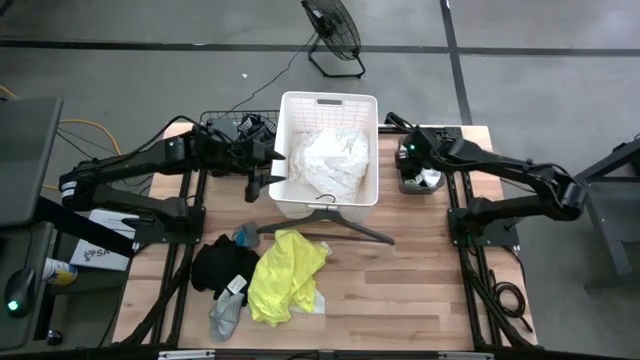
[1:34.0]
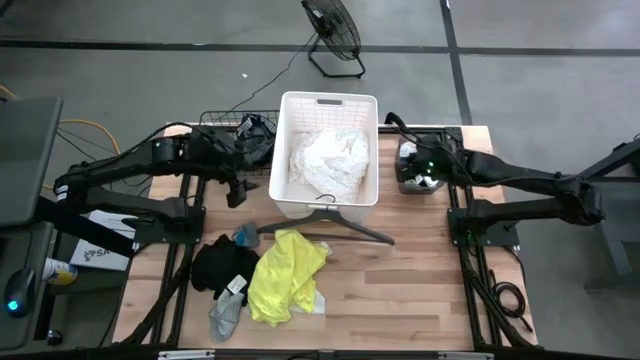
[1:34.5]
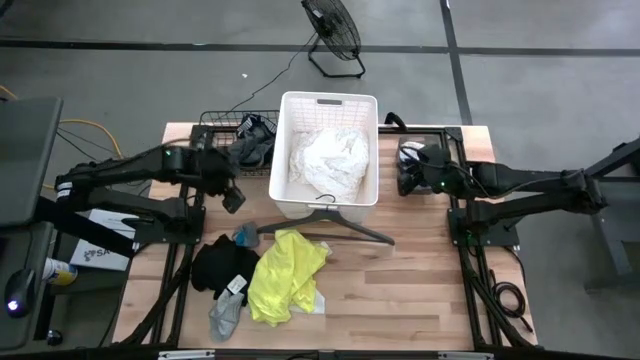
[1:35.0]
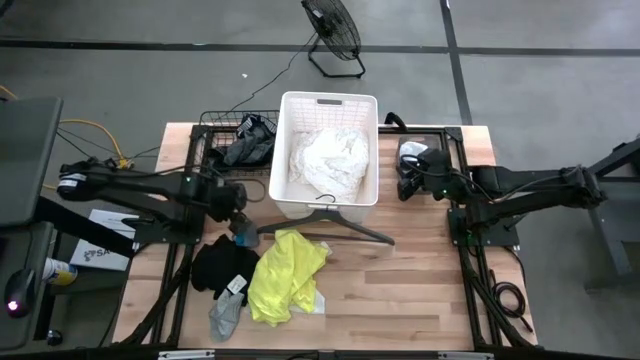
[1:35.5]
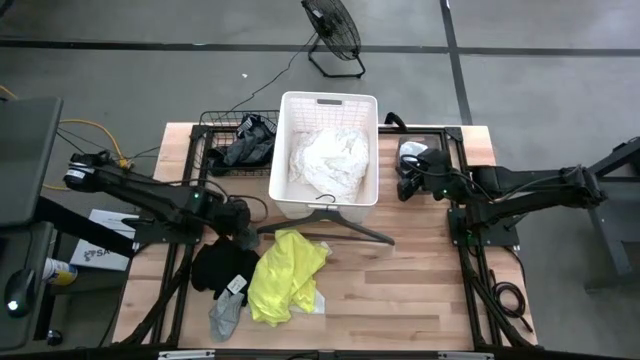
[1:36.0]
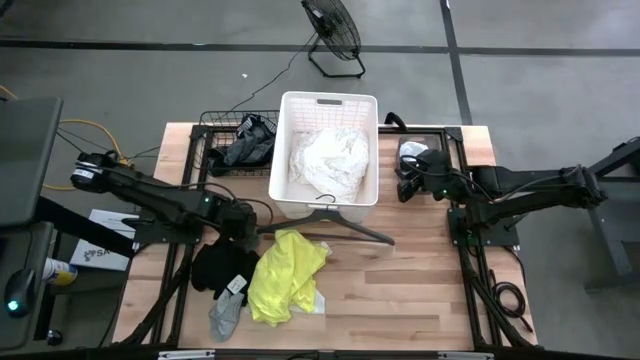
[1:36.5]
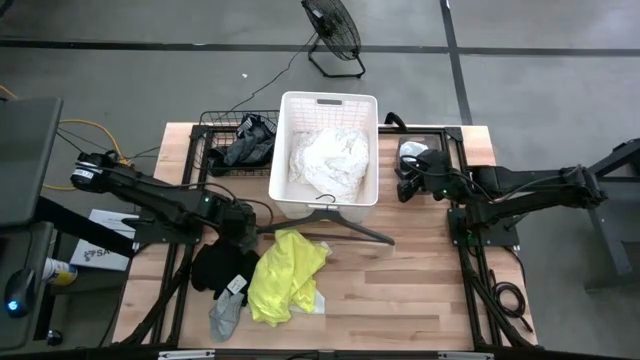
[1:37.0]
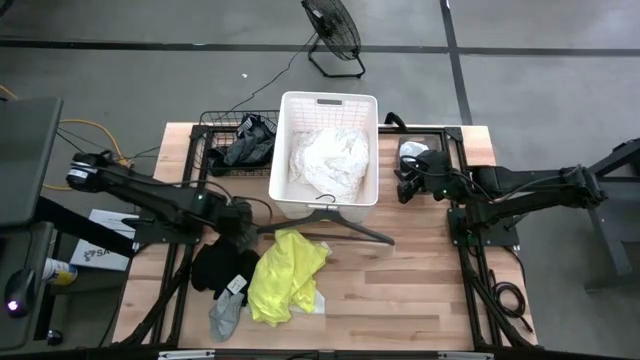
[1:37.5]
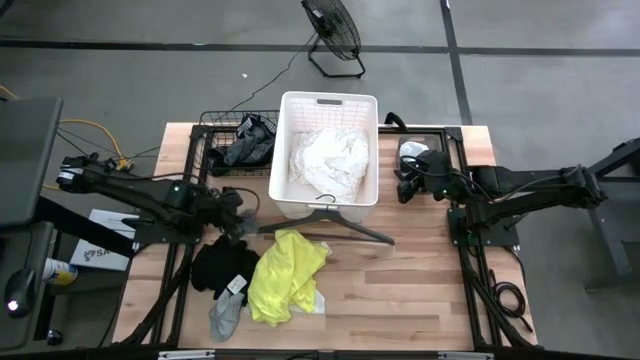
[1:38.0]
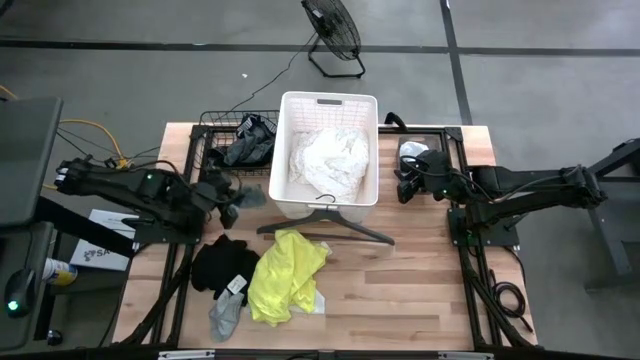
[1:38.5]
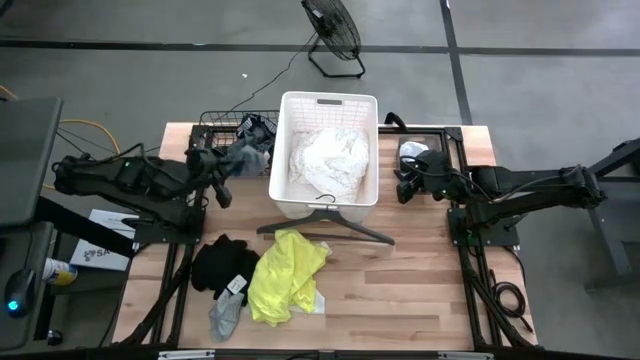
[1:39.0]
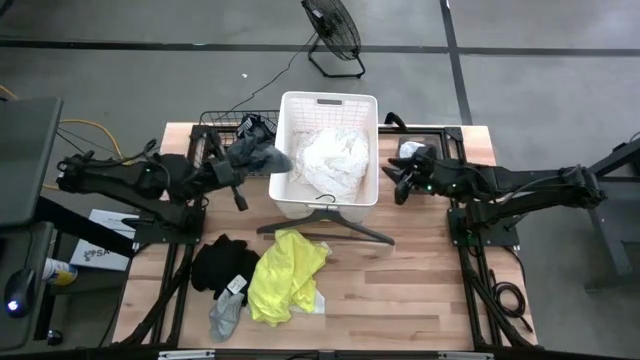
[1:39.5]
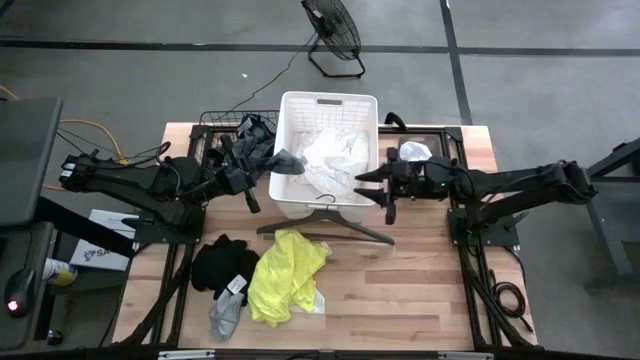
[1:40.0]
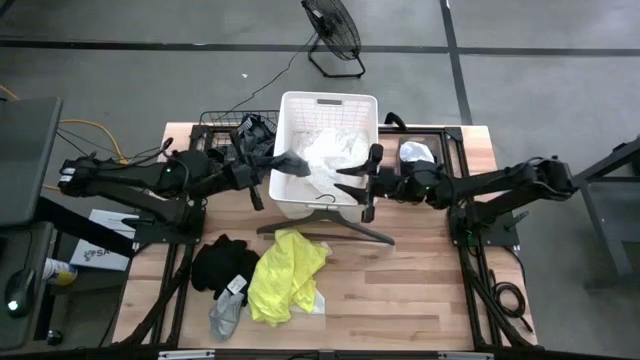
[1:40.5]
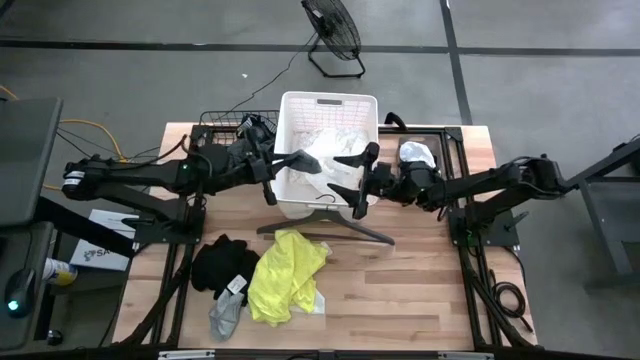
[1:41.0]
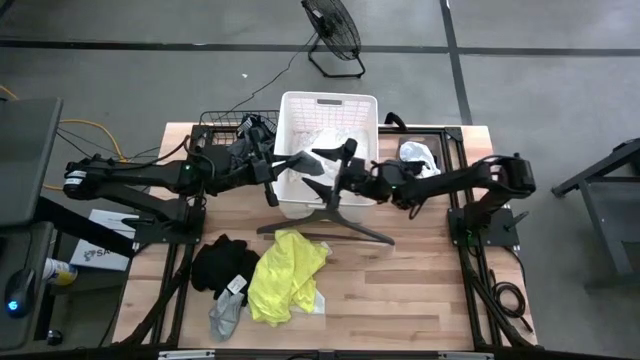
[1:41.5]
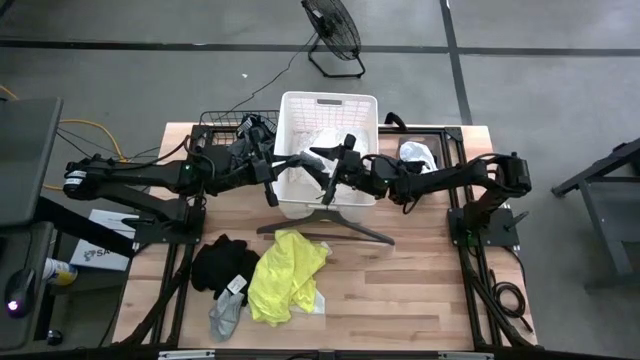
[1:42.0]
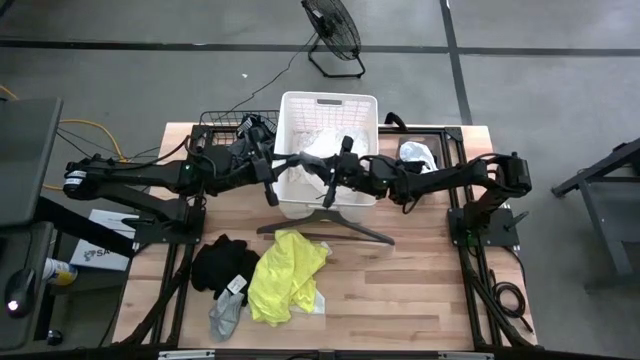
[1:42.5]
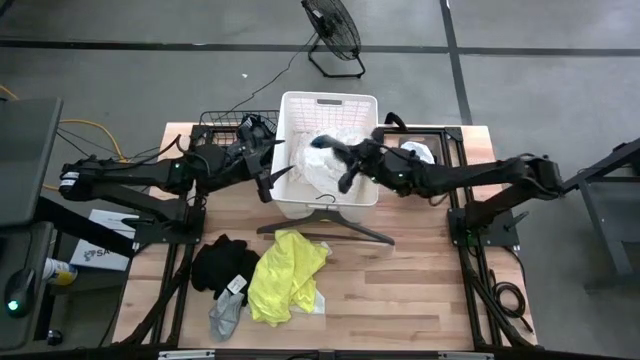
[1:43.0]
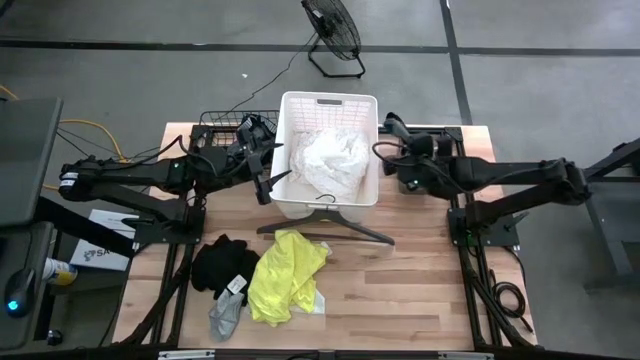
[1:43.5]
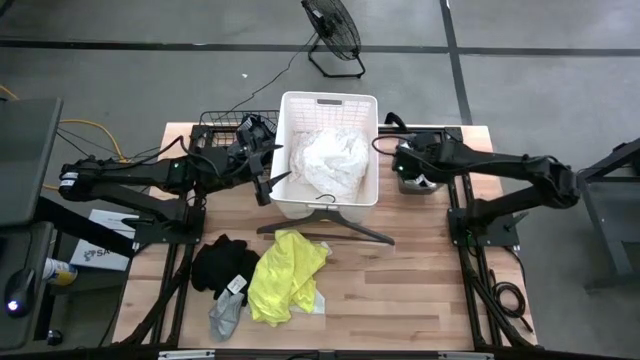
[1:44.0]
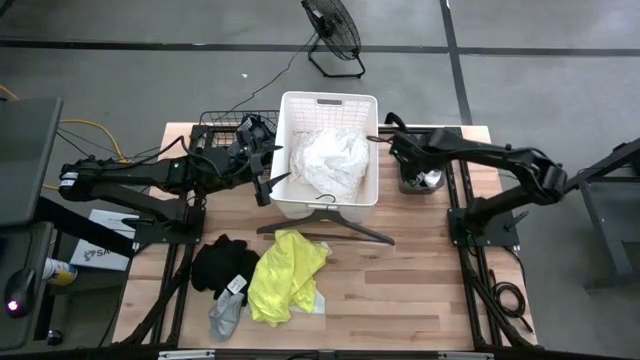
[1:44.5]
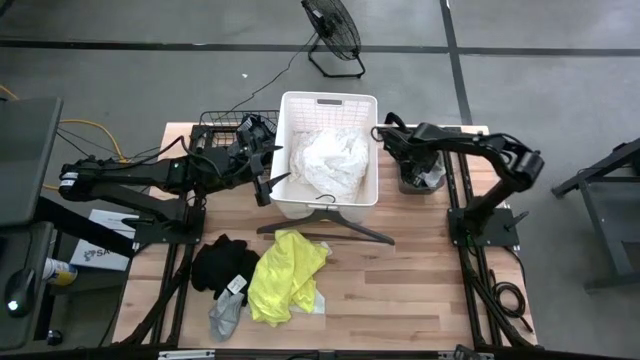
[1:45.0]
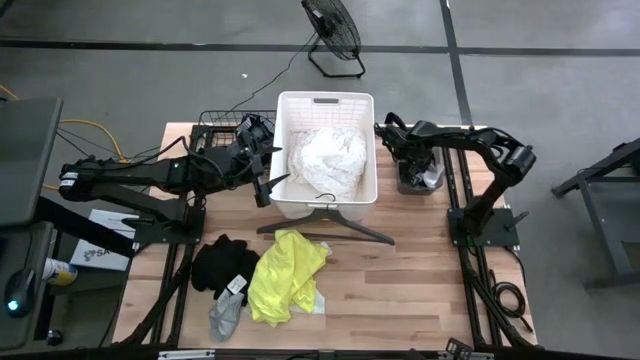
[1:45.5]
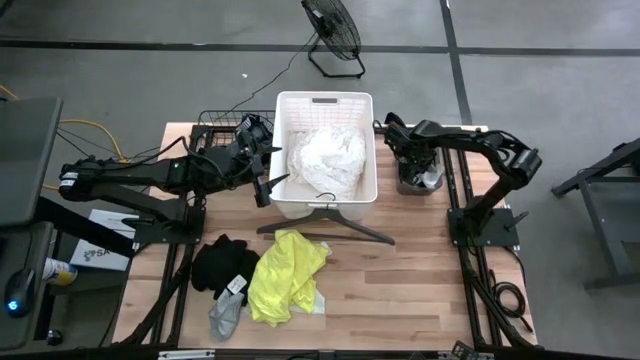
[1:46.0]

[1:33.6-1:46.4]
Task: Pick & Place Cloths
Put the grey blue sock into the black bin

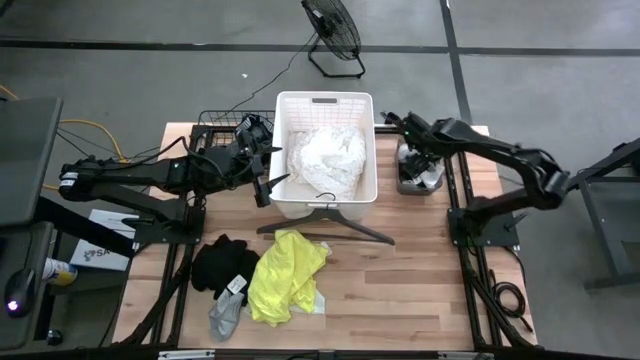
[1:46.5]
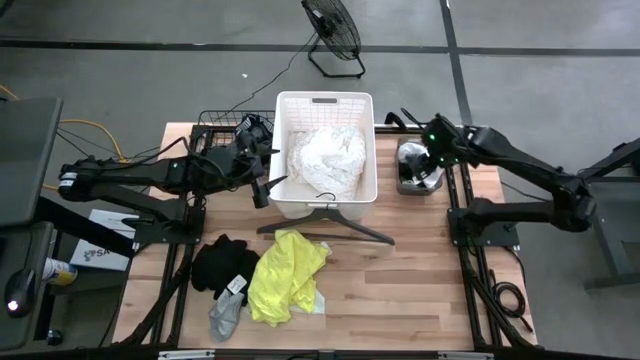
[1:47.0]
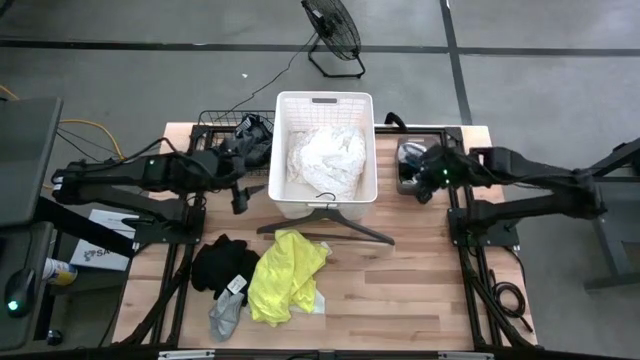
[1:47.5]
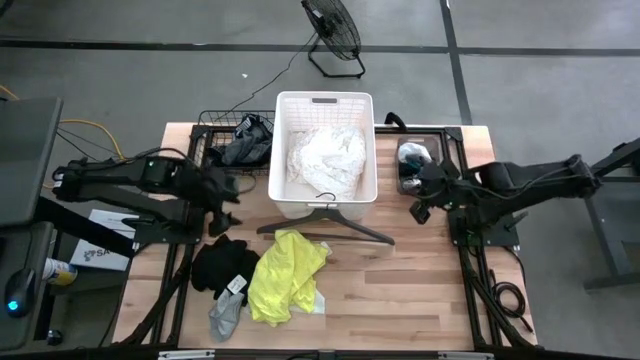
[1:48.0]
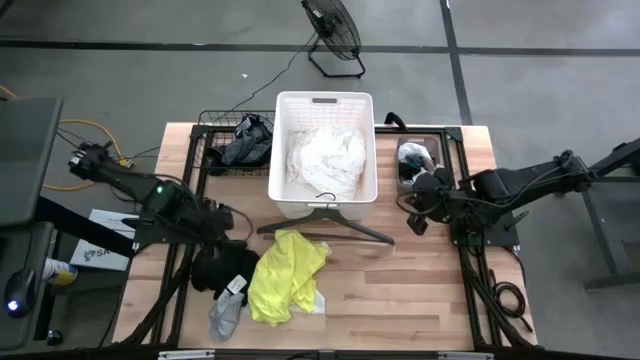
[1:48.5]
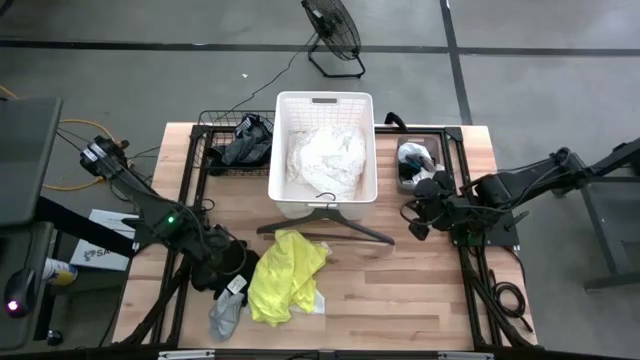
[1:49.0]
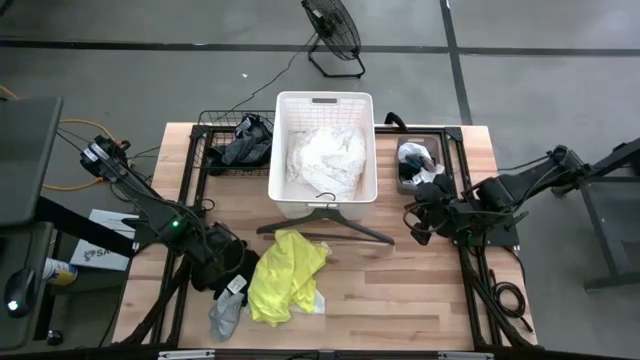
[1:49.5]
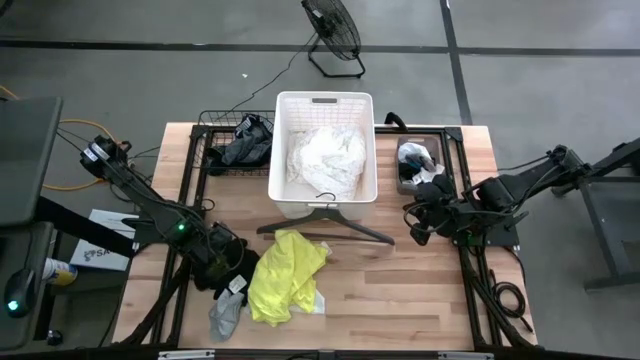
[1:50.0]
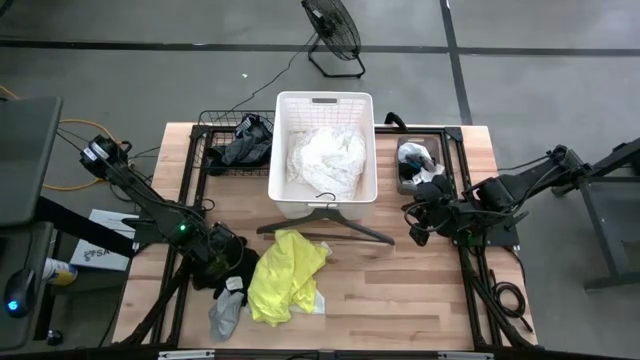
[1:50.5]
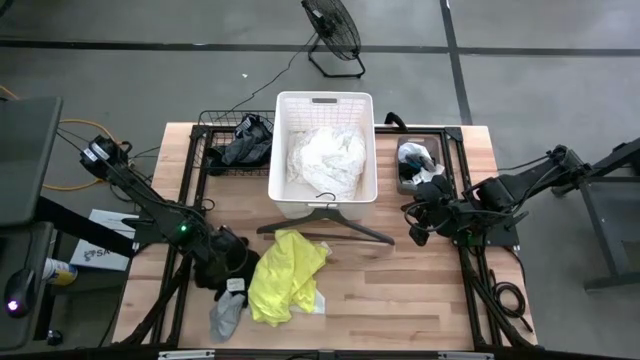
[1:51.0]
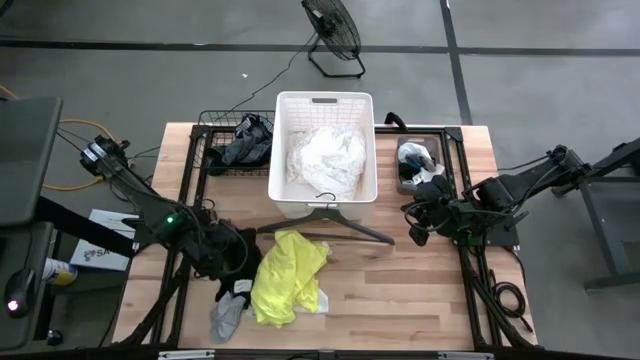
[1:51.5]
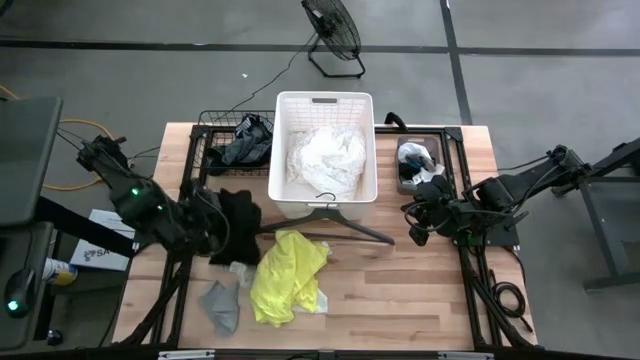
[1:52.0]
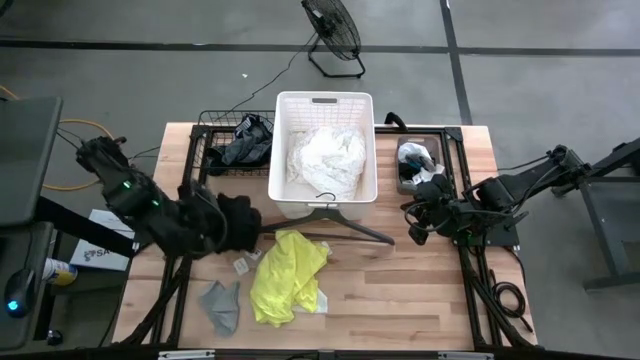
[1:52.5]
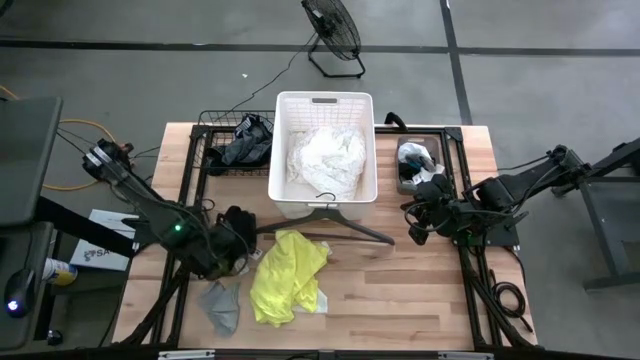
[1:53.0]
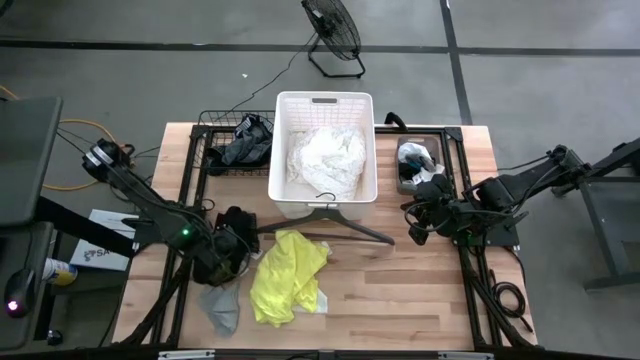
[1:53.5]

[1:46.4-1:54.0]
Put the bottom black underwear into the wire basket

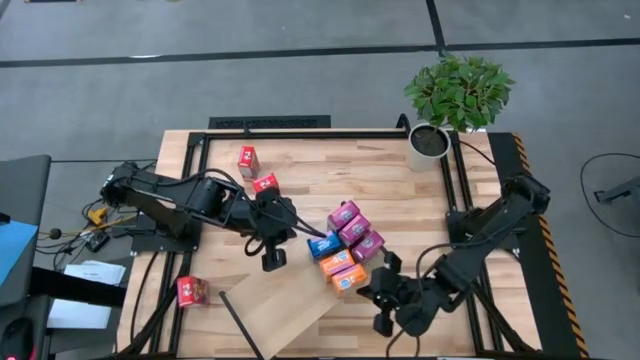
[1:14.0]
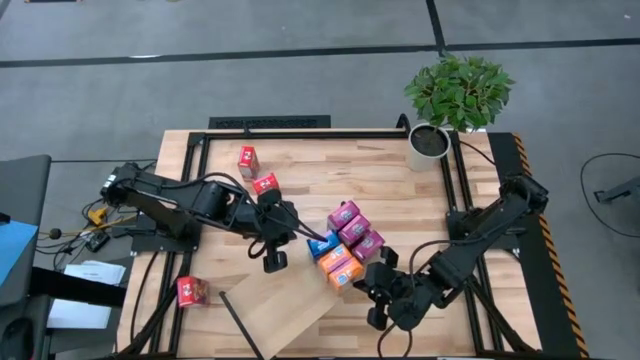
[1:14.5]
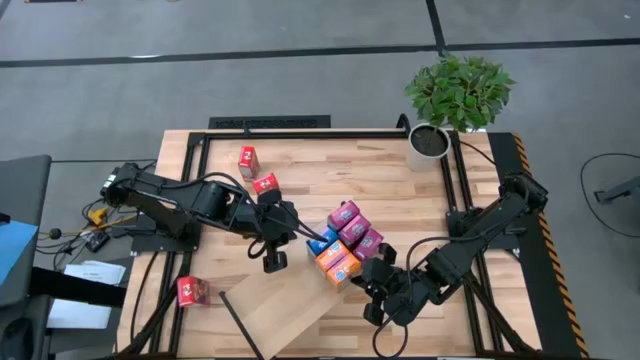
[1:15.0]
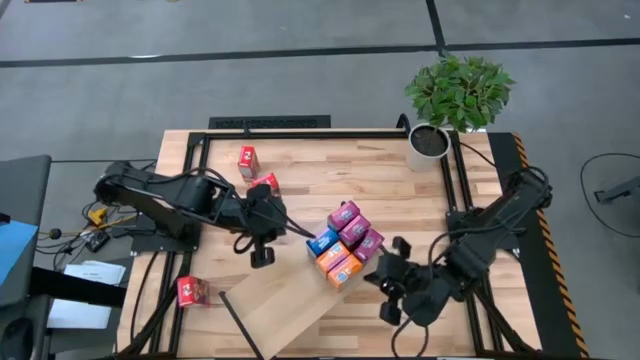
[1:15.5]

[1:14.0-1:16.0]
Task: Stack cereal on shelf
Adjust the cereal boxes on the shelf
